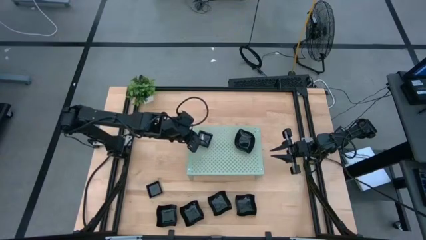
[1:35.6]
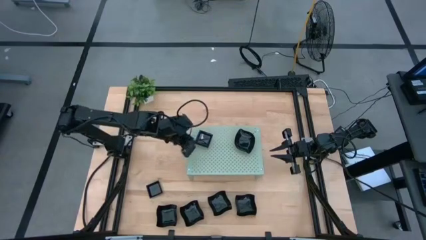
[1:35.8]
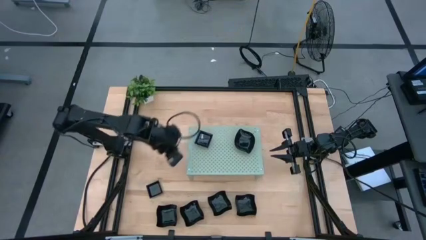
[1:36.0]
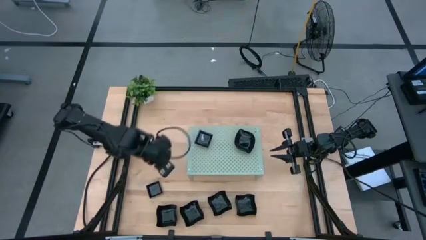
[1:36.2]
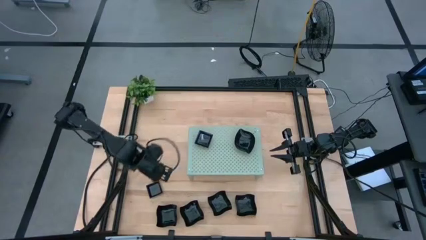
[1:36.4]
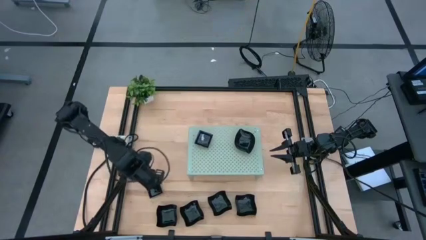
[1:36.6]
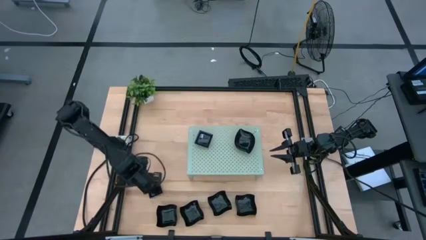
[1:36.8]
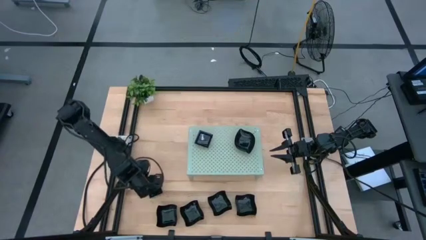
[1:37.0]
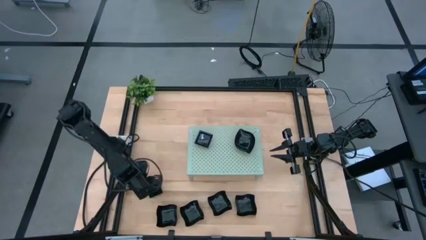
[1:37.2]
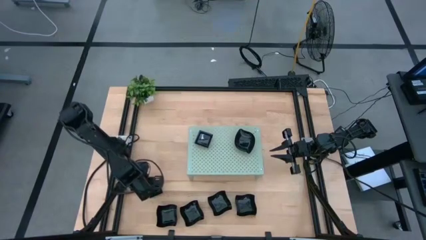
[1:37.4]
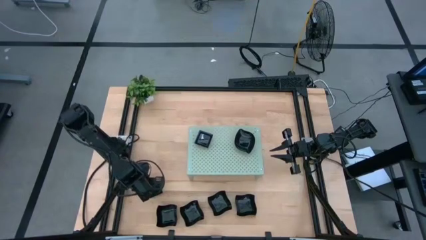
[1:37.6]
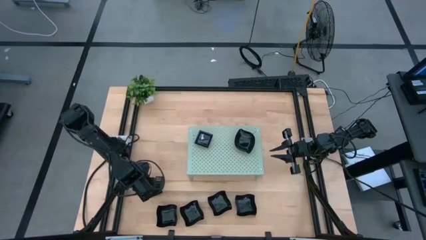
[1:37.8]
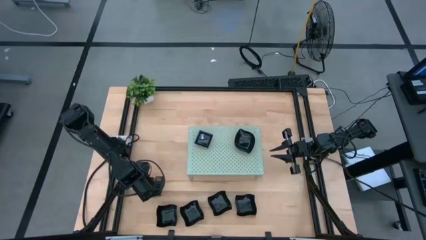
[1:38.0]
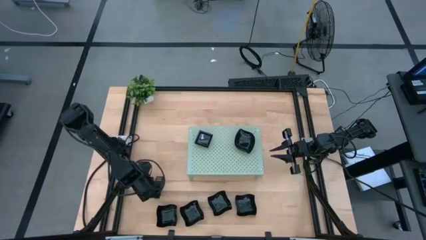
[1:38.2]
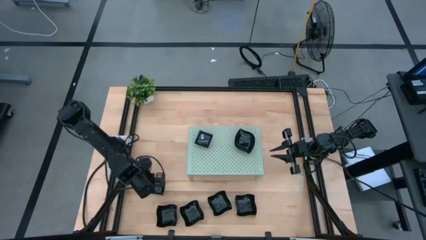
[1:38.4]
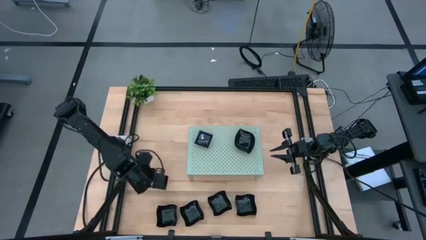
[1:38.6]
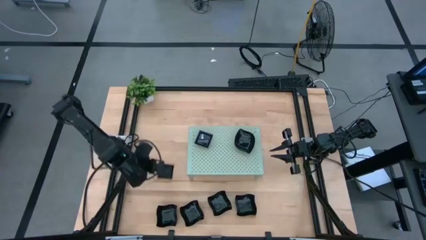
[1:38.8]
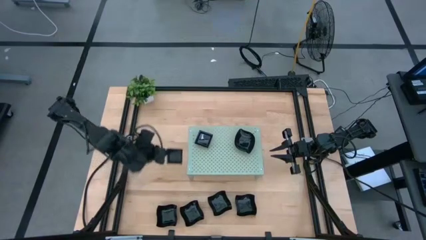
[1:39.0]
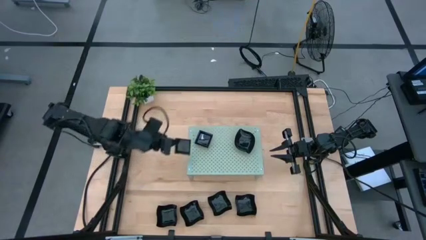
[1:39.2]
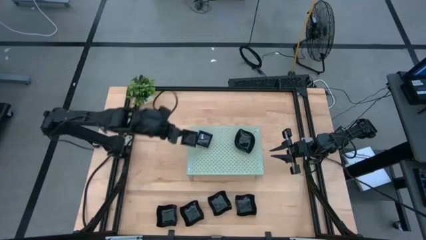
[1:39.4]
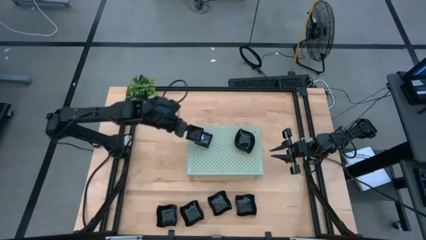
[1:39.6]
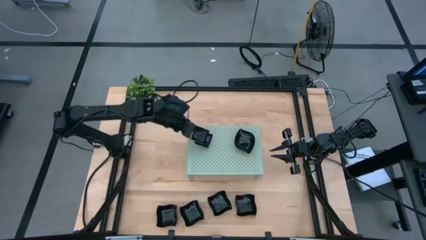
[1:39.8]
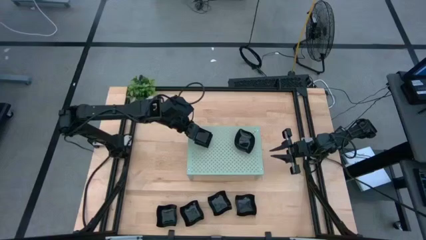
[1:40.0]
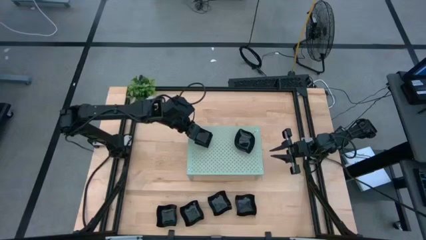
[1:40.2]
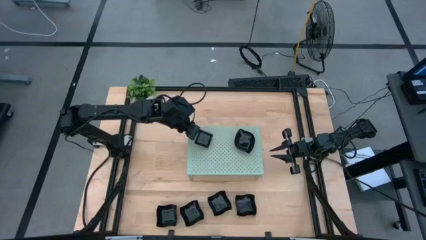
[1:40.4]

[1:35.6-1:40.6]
Task: Pick & Place Mini shaped plates
Stack the square plate on top of the square plate on the shelf

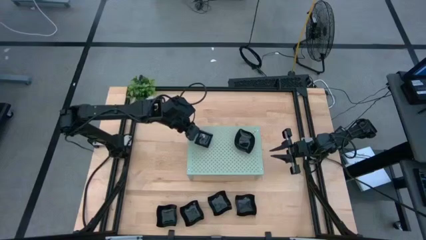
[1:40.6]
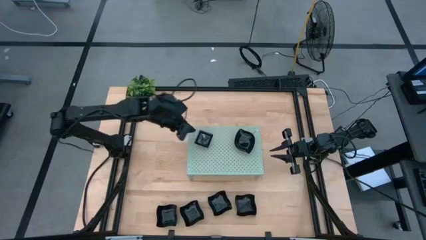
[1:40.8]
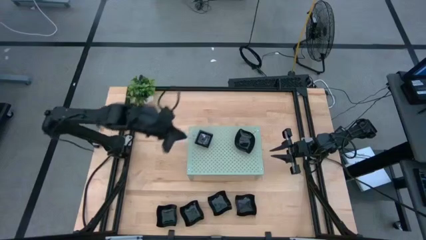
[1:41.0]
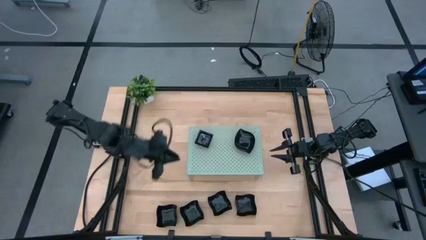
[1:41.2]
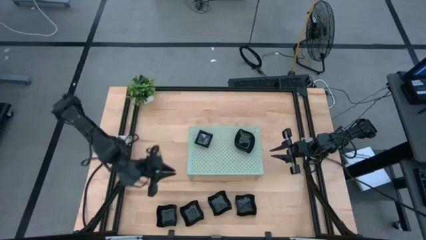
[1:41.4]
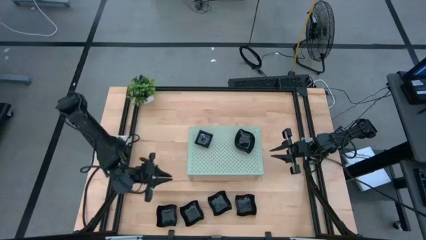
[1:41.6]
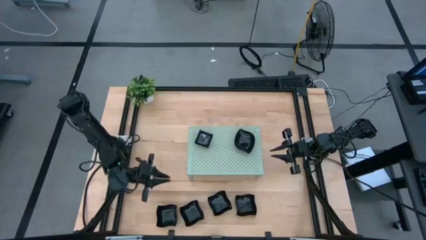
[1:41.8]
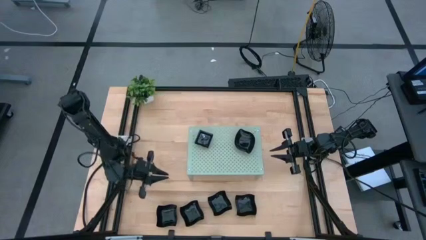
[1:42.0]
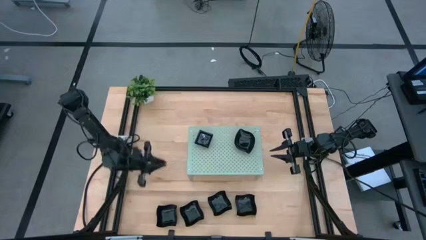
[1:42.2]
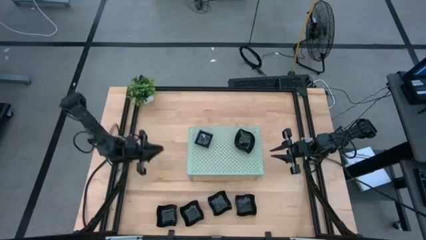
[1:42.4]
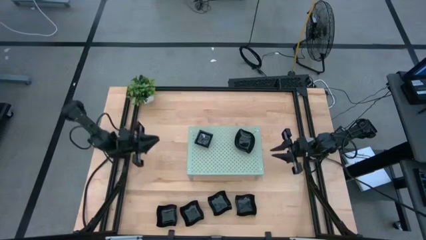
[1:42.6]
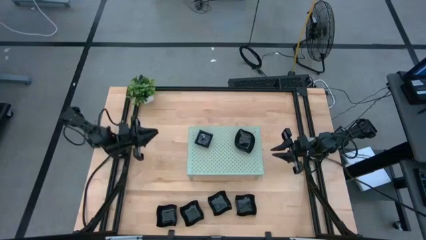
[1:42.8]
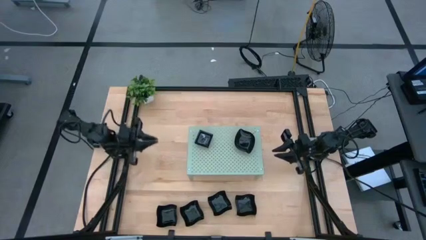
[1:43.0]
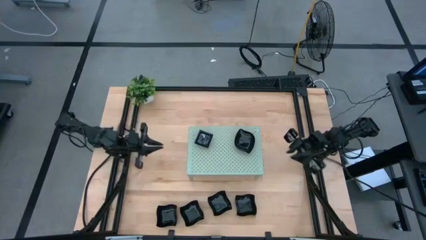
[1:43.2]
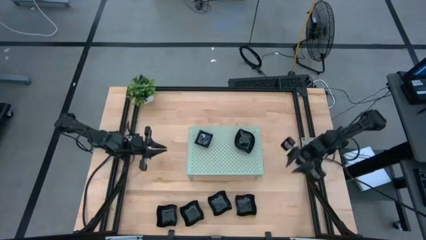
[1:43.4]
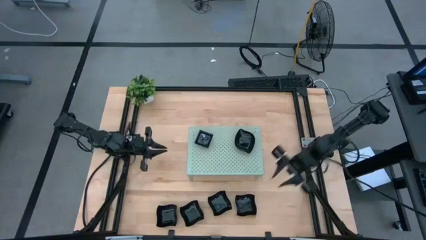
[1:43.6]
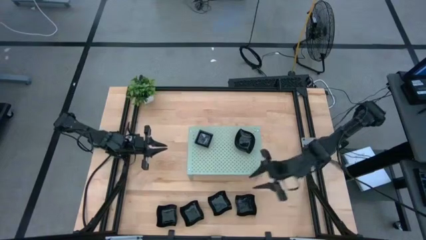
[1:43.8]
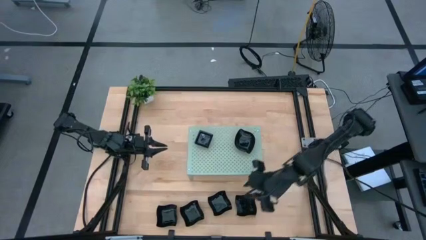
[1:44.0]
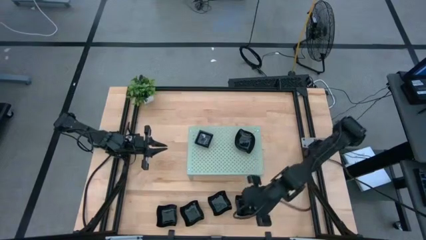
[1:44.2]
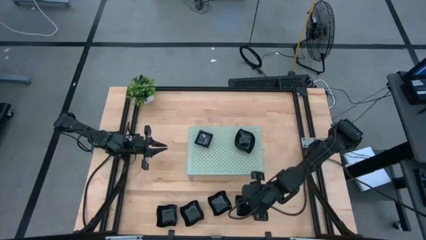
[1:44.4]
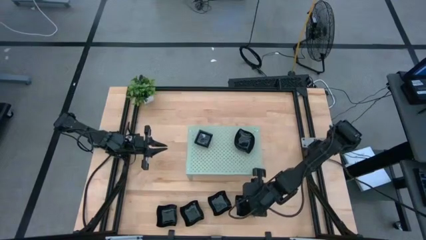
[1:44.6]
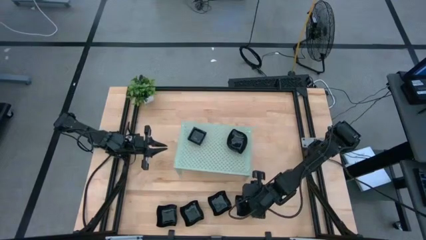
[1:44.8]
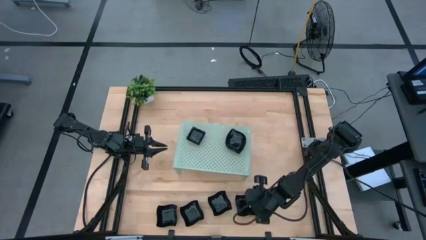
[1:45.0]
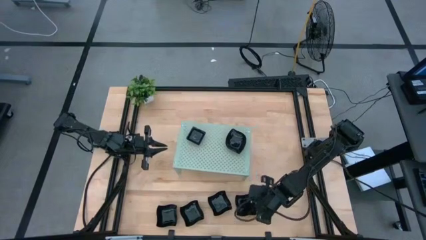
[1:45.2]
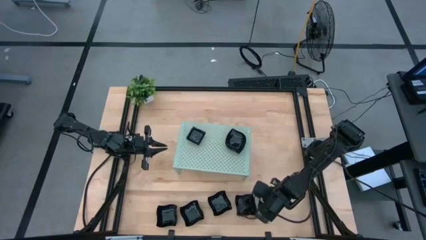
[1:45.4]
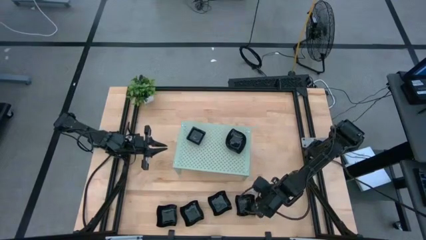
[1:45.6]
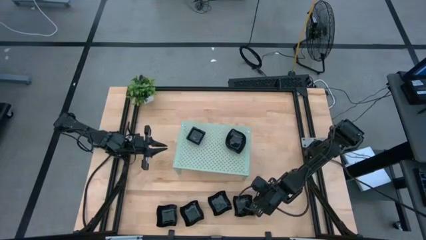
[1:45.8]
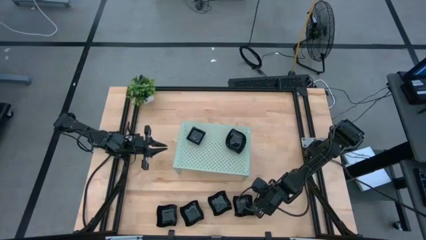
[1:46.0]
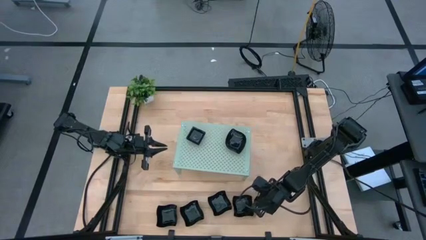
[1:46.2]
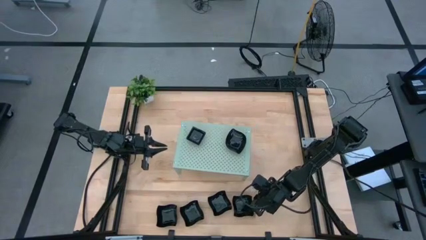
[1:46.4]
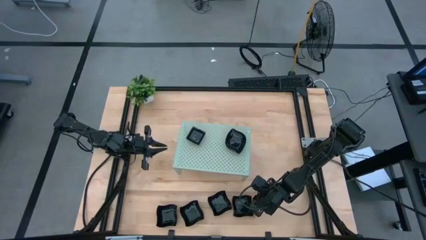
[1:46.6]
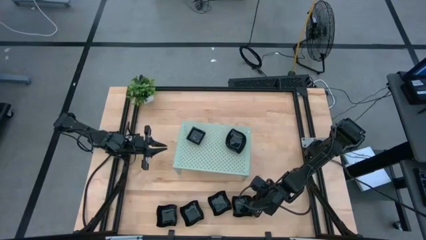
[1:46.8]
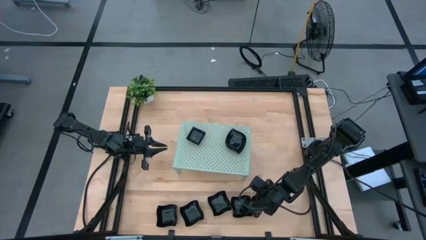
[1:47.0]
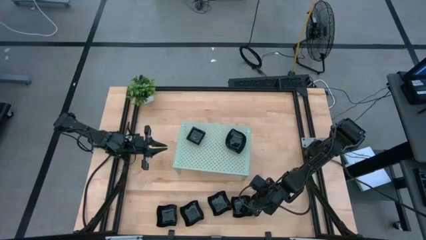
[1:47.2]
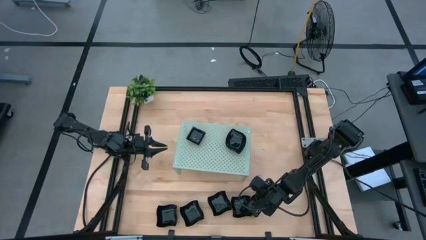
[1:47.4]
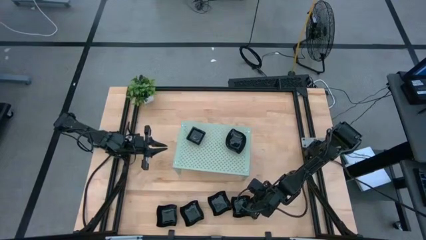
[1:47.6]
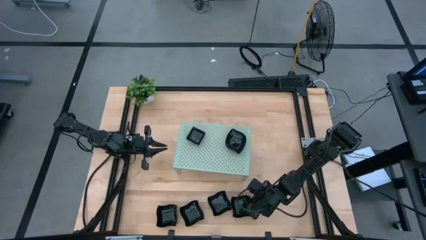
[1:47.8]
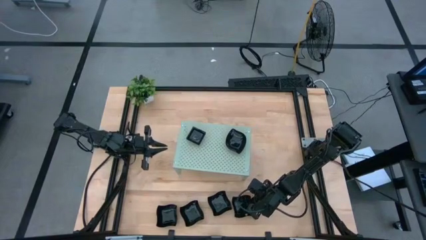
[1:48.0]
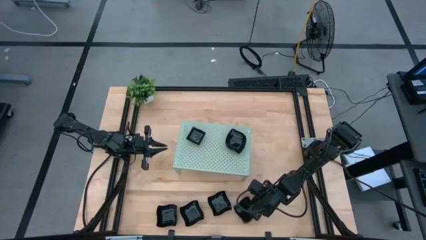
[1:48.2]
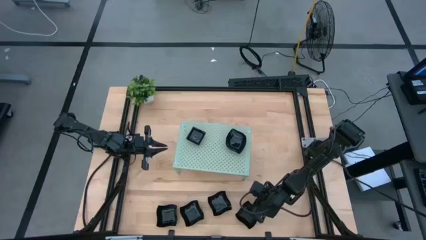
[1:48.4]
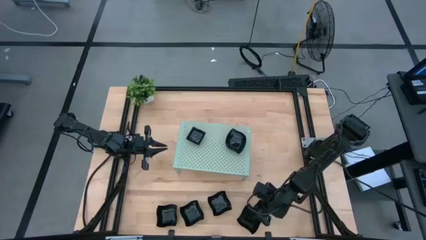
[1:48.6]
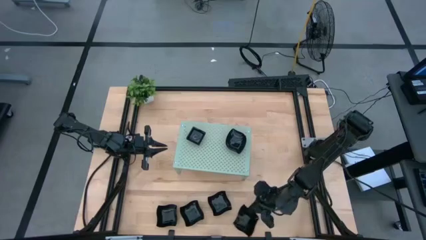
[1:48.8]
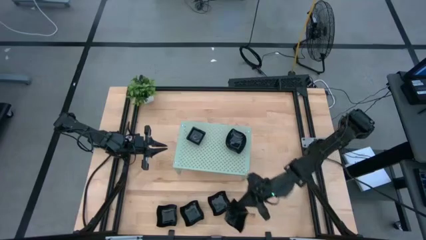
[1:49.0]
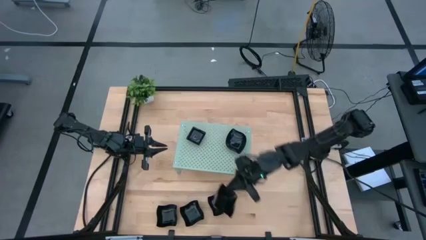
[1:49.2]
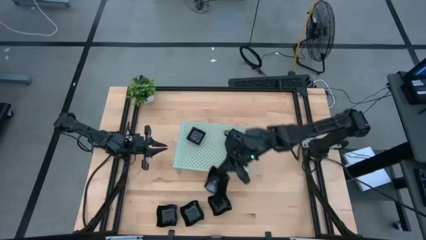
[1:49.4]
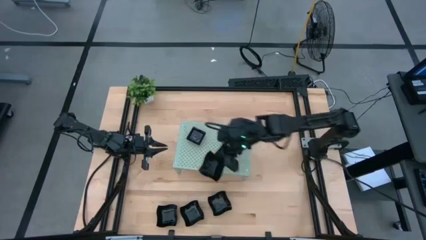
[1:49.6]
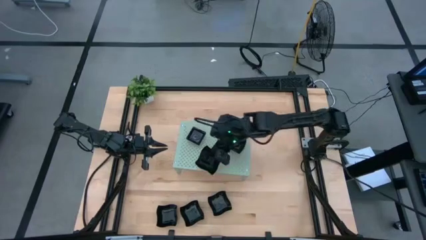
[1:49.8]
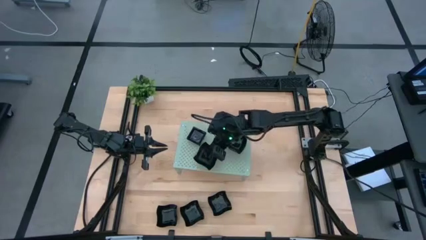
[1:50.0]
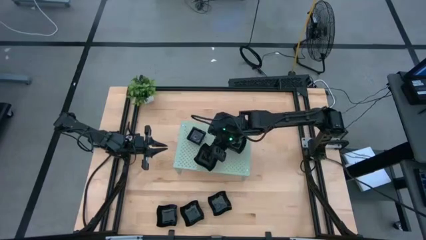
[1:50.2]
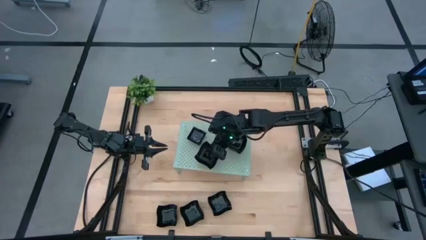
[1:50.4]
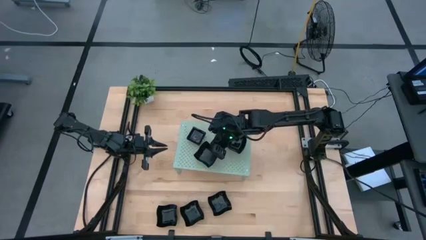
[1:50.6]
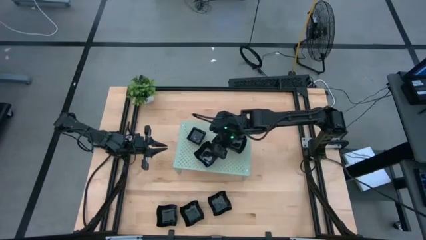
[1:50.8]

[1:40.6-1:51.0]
Put the distorted square plate on the shelf

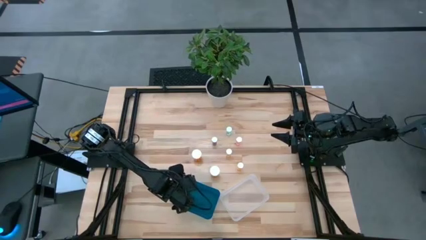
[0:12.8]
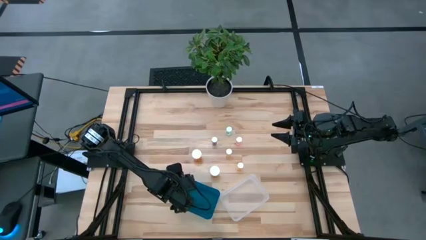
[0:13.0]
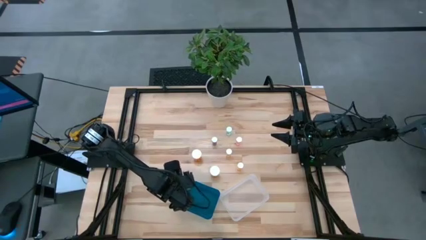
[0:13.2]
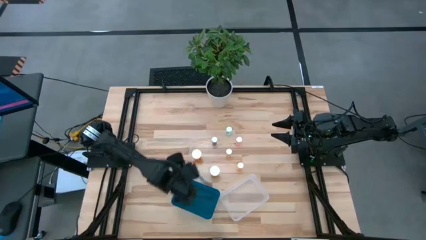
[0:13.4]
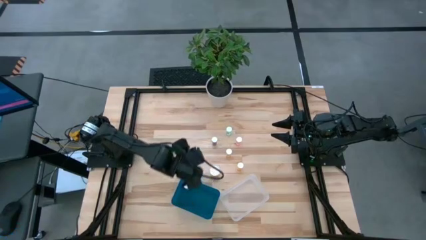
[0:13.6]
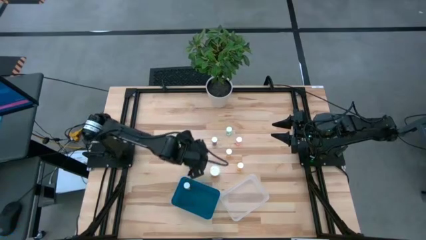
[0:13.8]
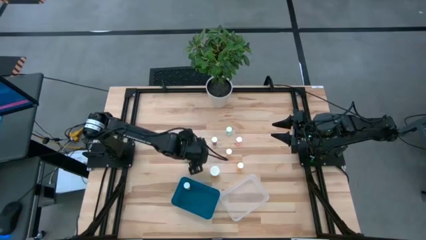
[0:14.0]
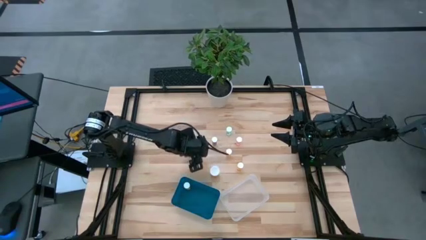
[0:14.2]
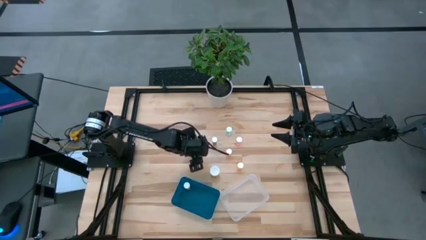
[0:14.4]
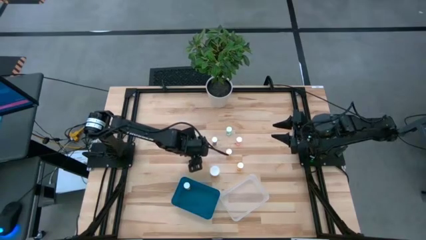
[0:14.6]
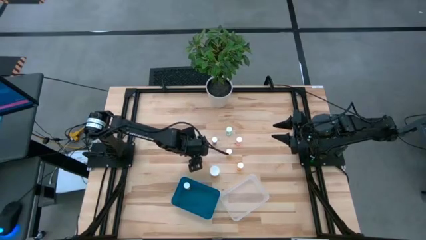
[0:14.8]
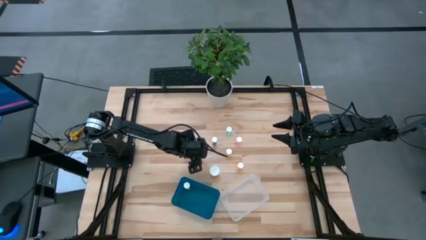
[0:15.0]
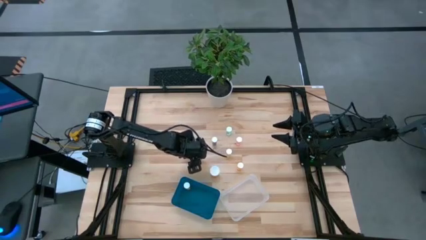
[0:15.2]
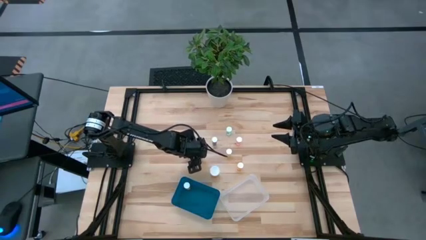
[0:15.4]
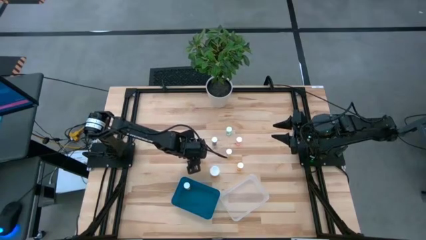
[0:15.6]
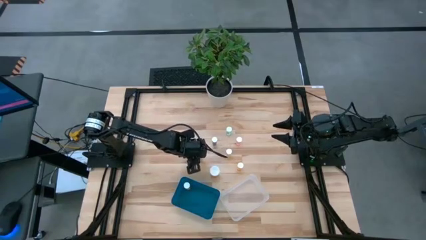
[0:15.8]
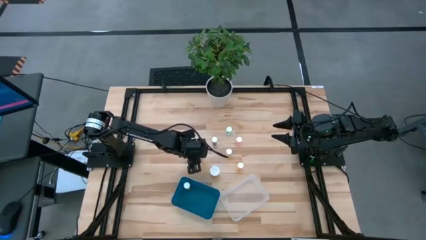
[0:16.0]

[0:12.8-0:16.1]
Task: Pick and place medicine bottles into bin by pill shape (circle, oval)
Put the large orange pill bottle into the blue bin
